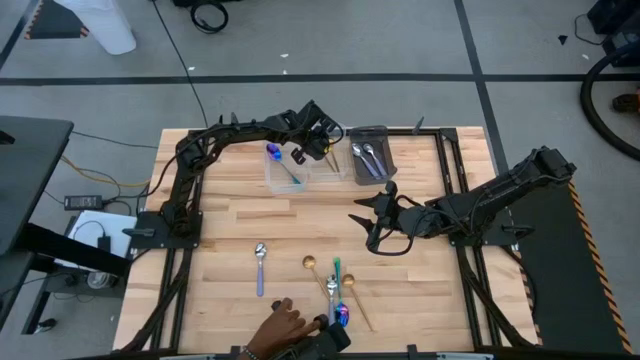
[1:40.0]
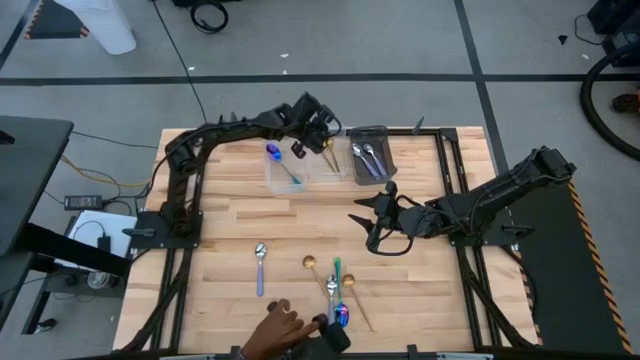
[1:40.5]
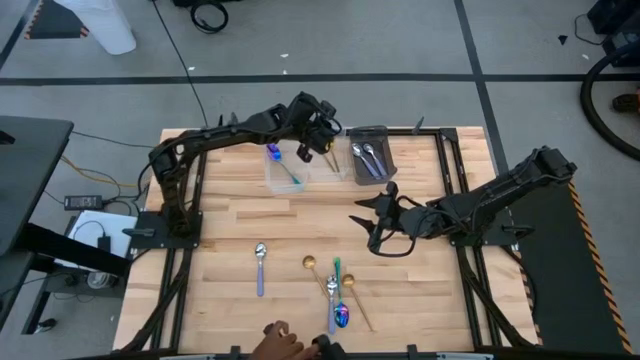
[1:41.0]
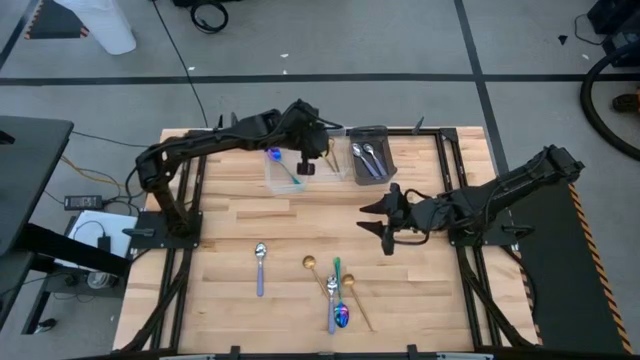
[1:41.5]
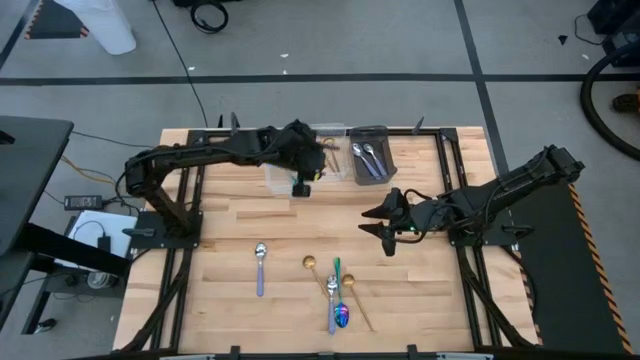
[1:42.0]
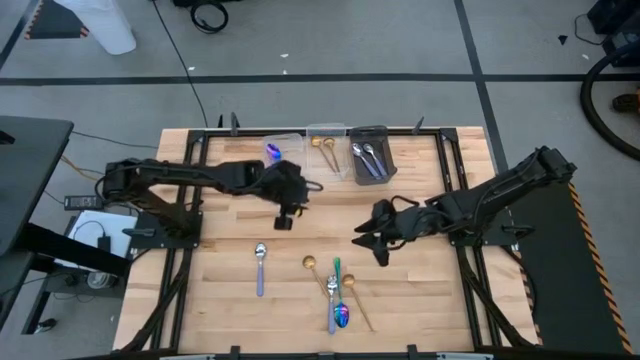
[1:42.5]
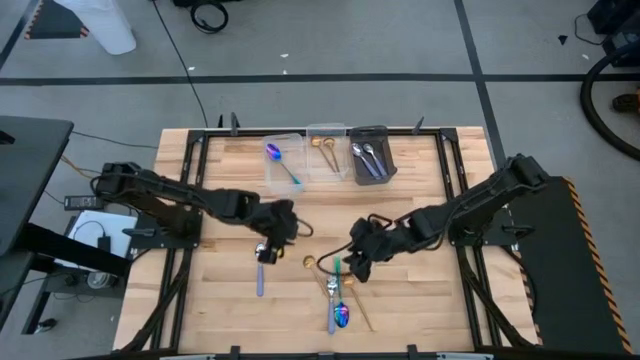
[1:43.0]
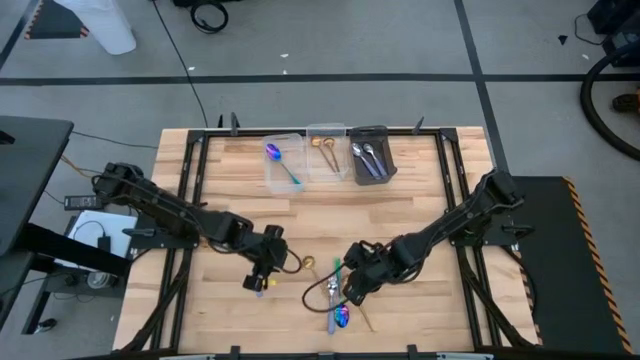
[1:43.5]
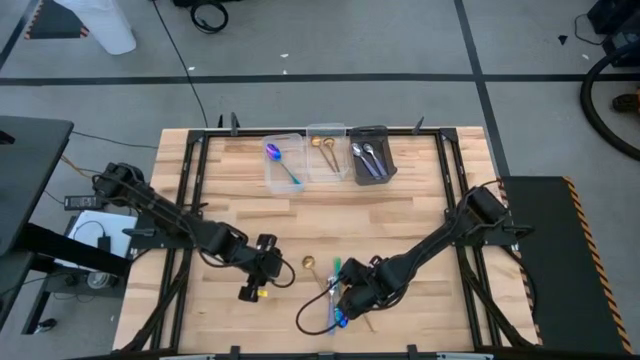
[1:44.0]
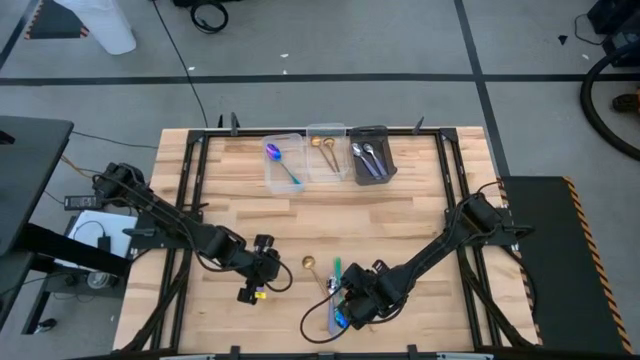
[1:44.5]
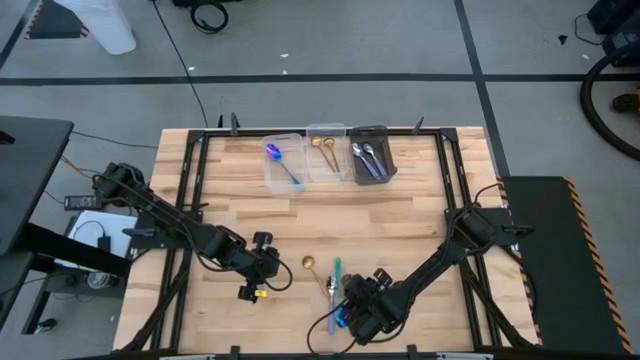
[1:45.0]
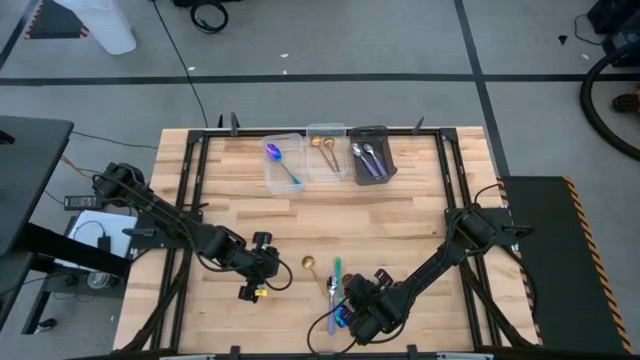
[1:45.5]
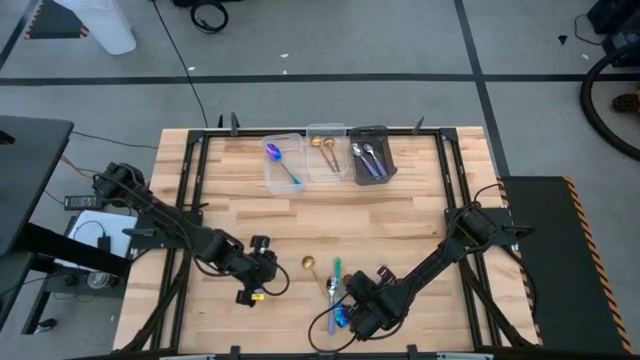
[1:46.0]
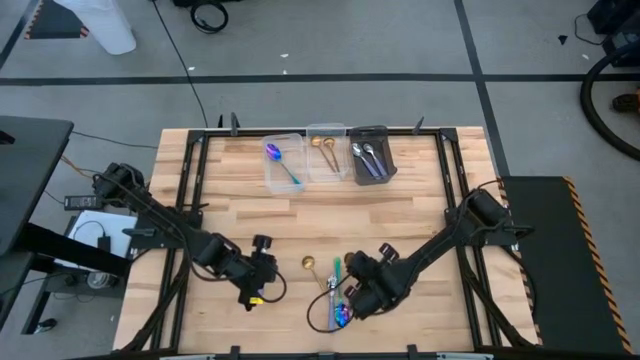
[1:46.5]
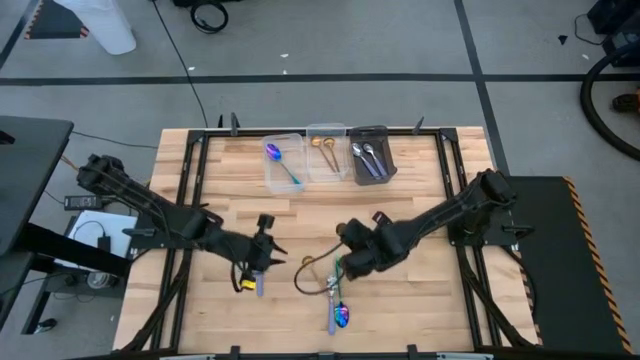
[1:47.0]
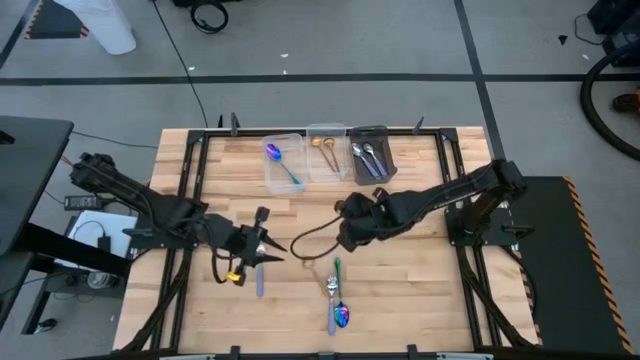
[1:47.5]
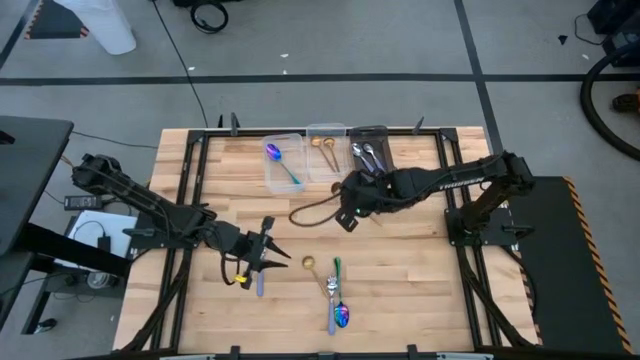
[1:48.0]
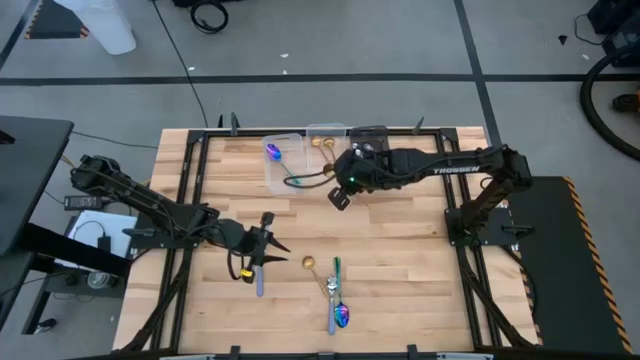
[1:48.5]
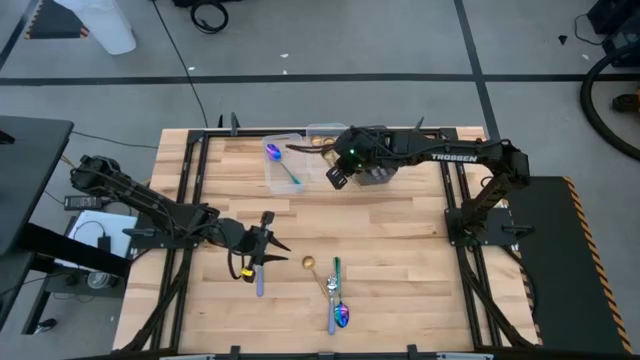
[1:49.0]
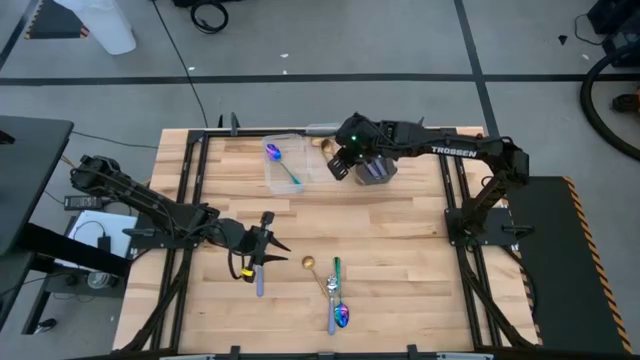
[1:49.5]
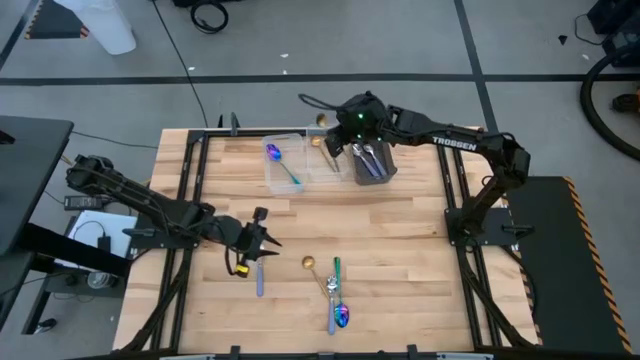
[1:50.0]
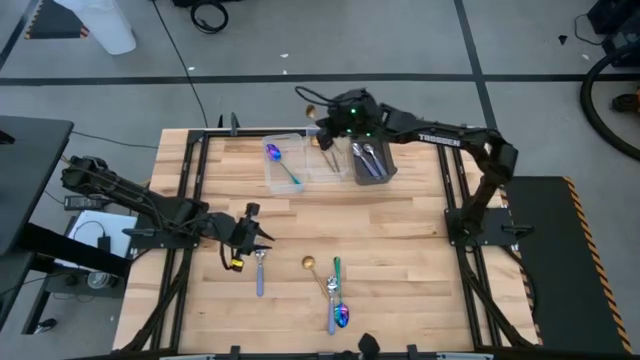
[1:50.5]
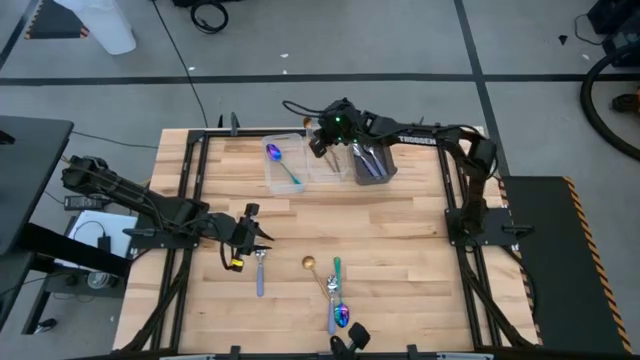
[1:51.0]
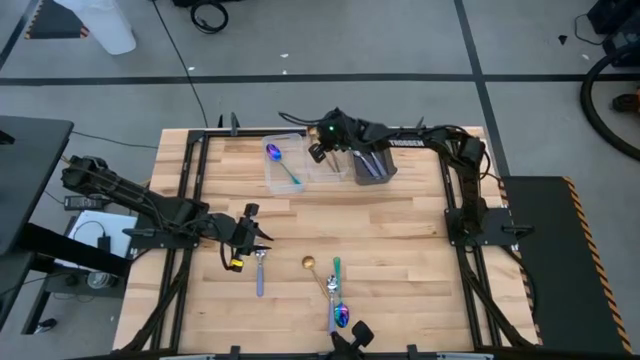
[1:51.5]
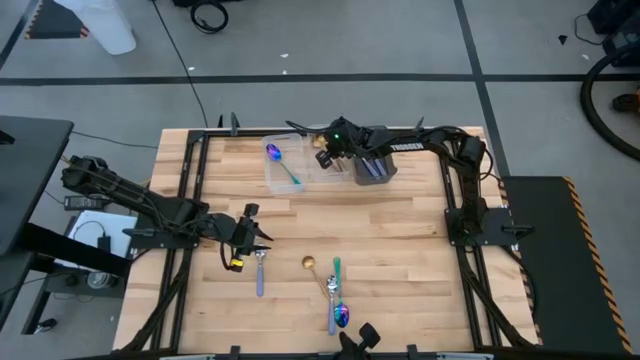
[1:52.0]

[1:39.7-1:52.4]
Task: Sort silverware by color (type)
Put the gold spoon into the right transparent bin

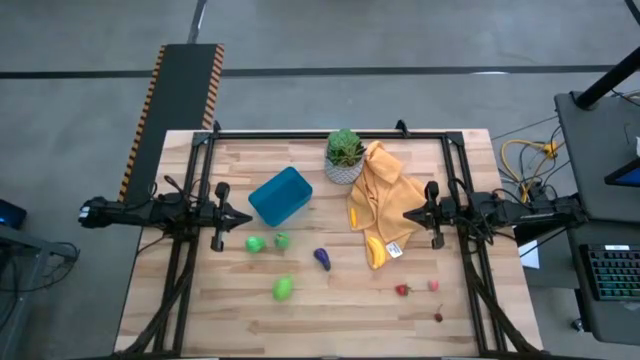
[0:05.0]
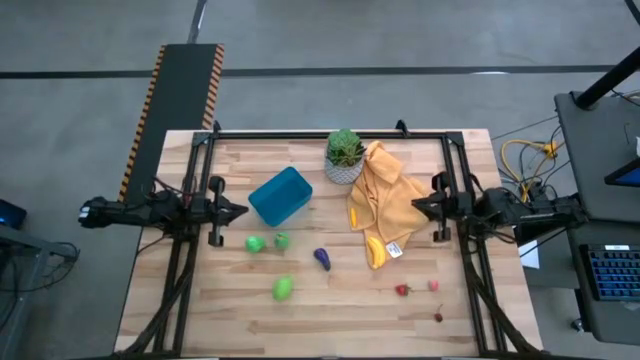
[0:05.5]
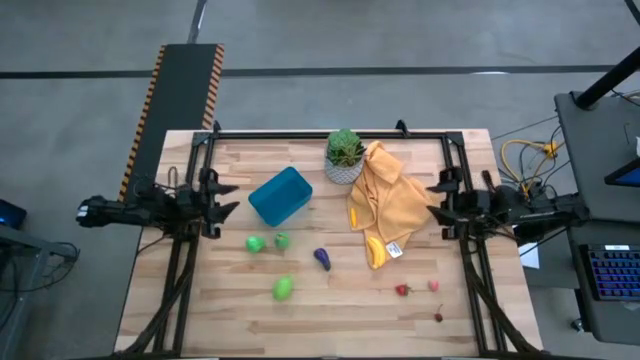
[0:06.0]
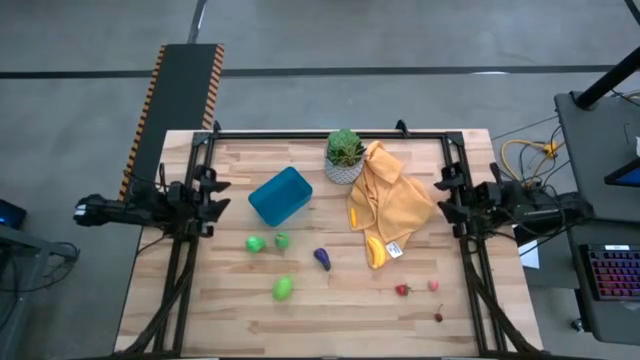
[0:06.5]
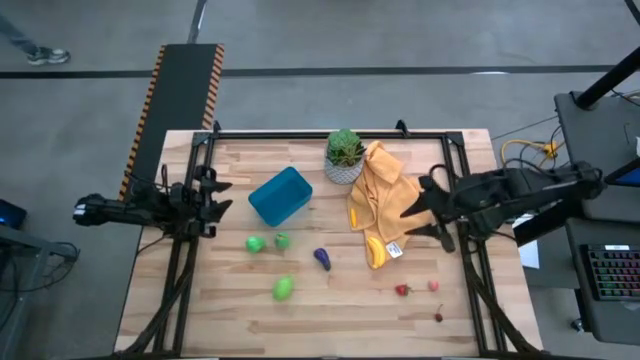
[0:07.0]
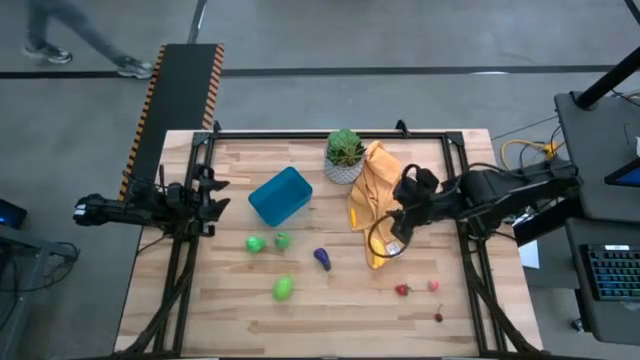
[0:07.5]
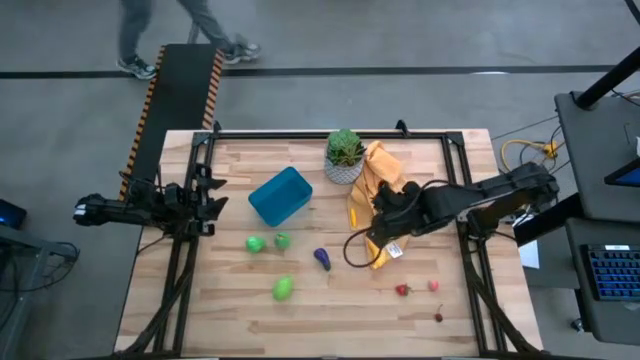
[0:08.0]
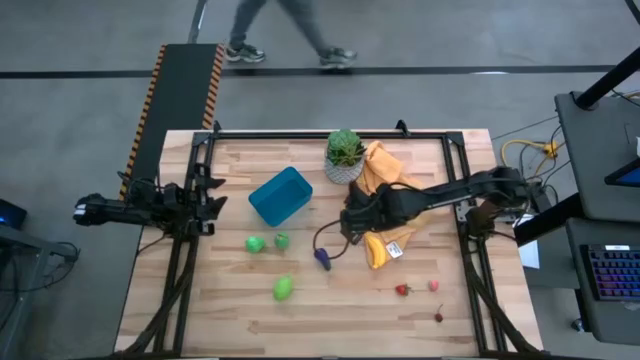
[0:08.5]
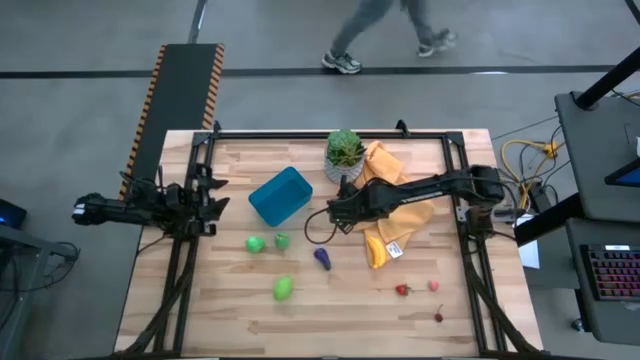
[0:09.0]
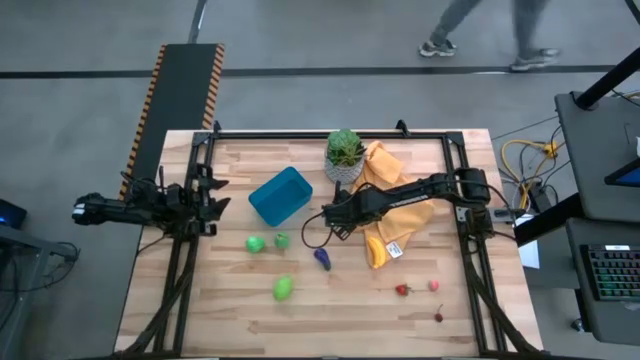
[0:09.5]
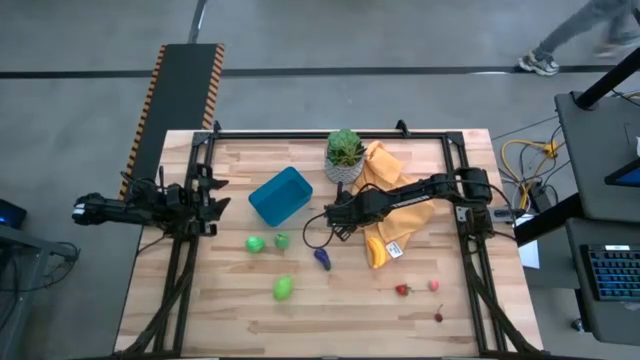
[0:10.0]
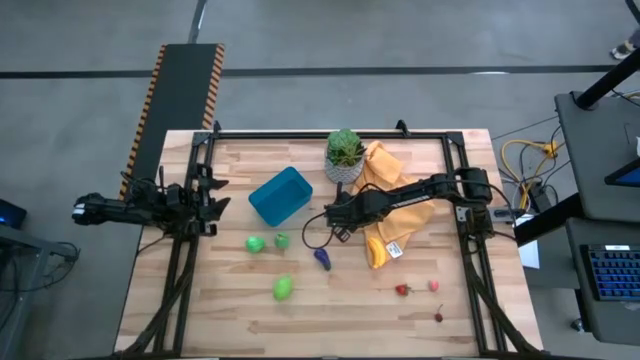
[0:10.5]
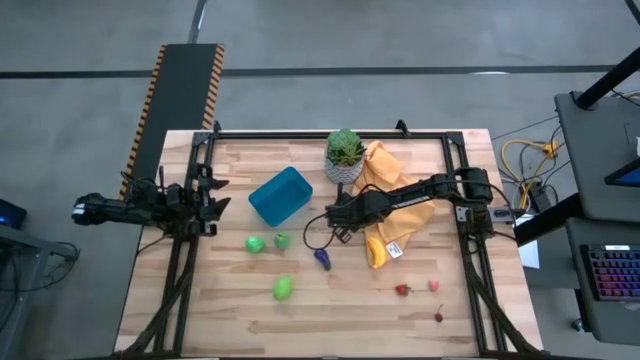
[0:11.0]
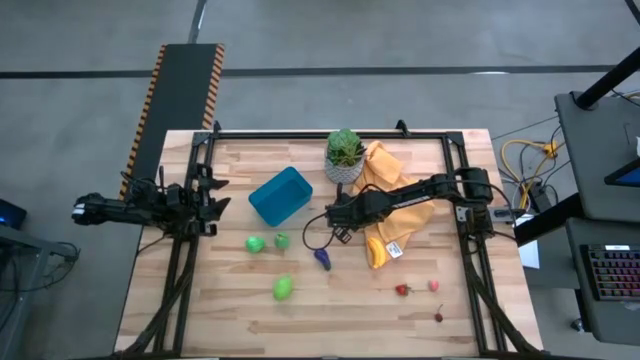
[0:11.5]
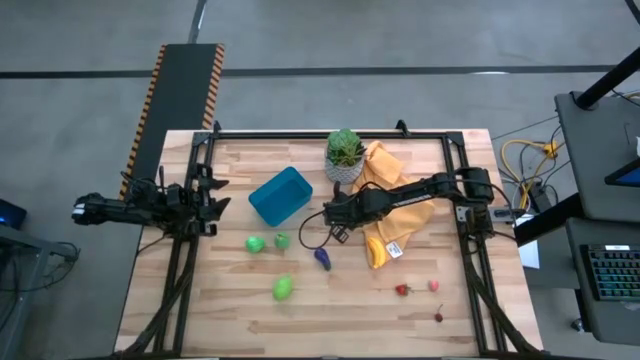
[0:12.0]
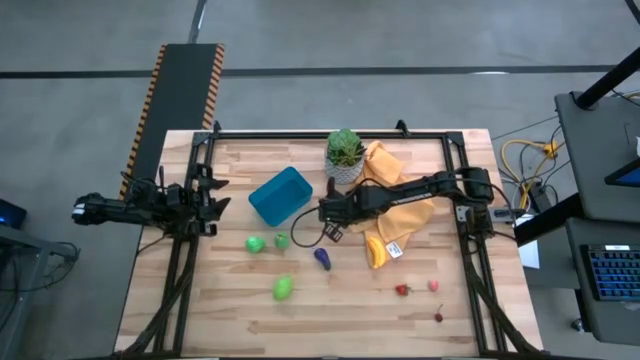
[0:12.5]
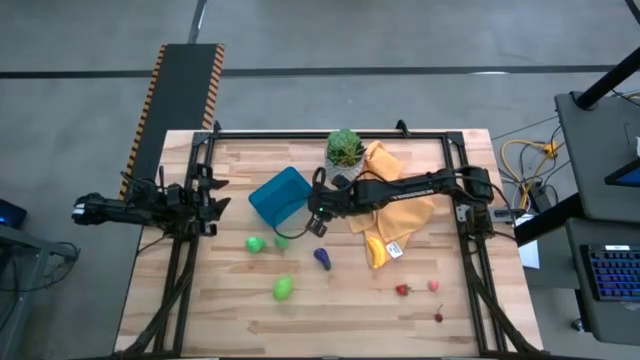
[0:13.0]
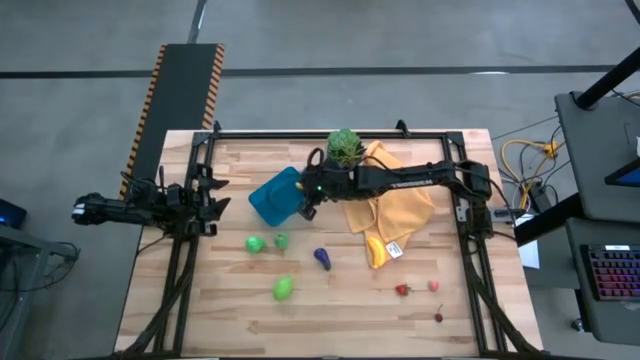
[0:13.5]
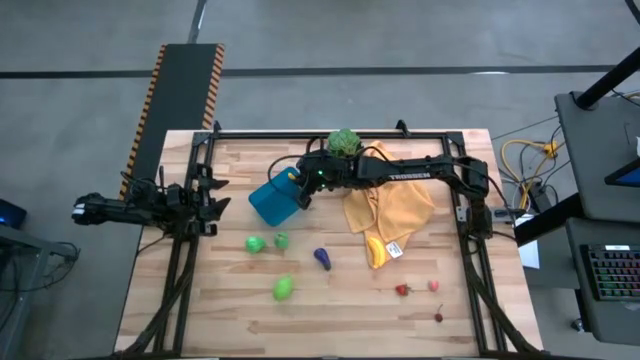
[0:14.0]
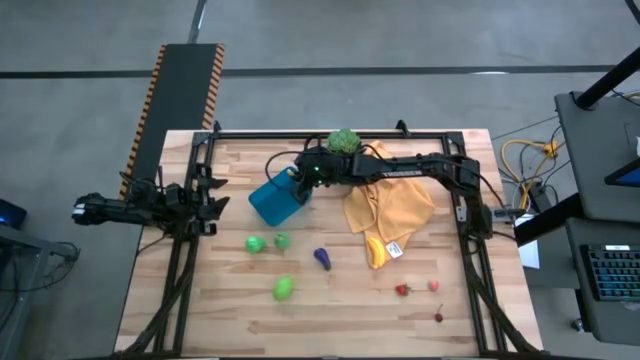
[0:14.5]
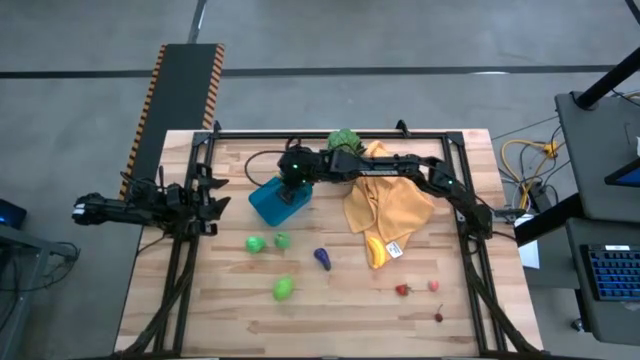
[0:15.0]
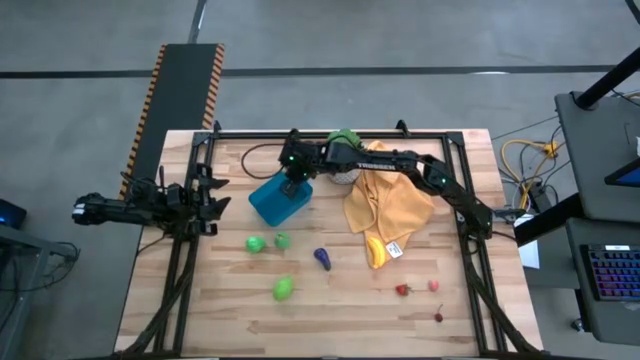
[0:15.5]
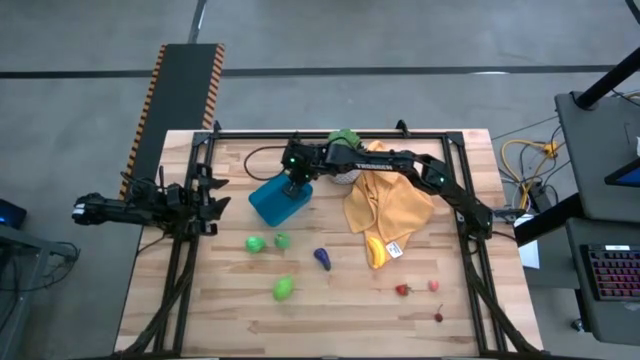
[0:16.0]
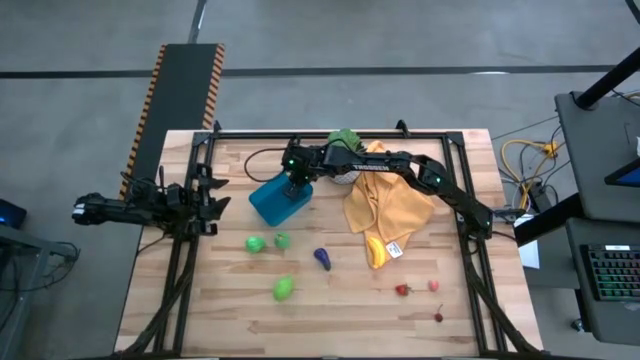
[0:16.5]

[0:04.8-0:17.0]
Task: Pick and placing Produce into tupperware
Put the yellow corn into the blue bin
